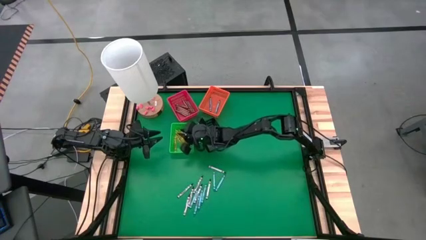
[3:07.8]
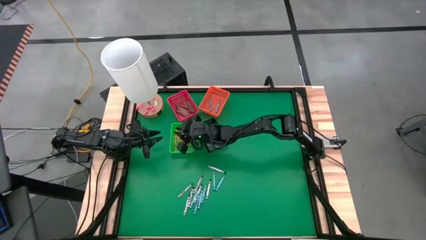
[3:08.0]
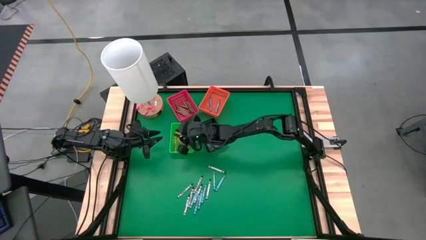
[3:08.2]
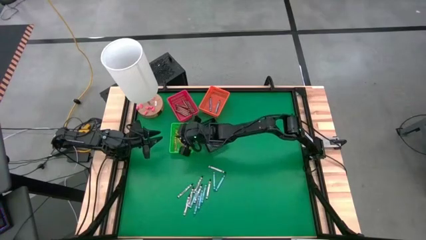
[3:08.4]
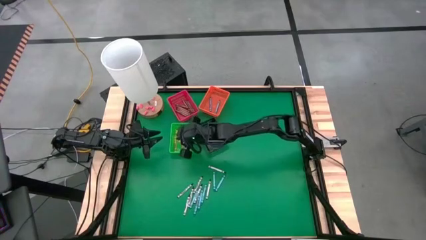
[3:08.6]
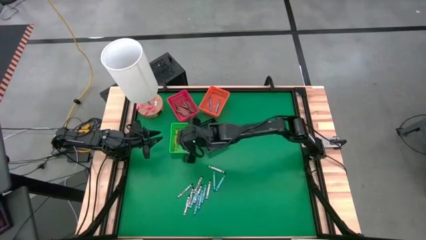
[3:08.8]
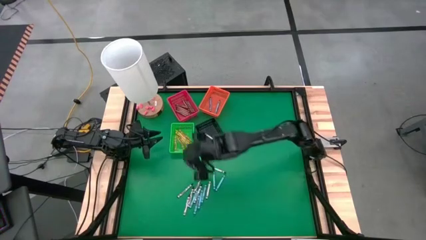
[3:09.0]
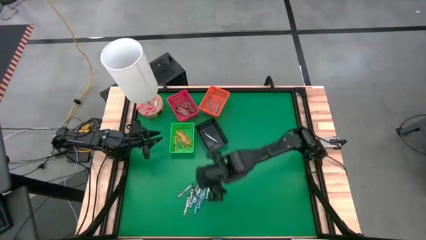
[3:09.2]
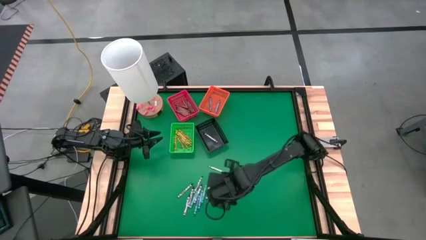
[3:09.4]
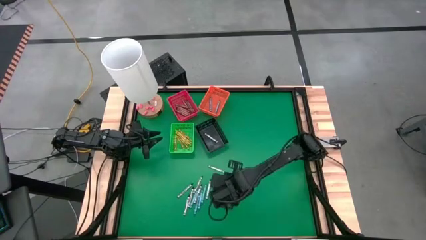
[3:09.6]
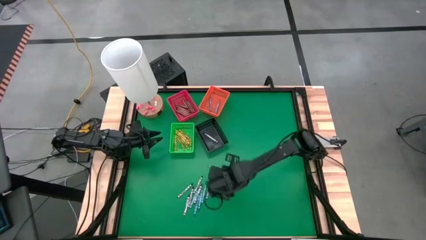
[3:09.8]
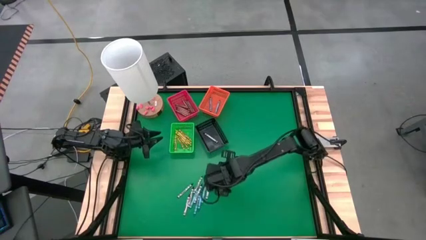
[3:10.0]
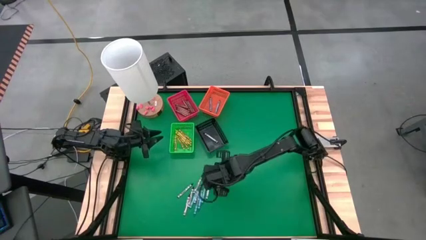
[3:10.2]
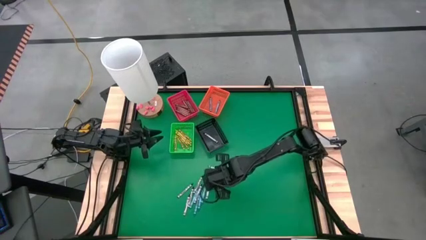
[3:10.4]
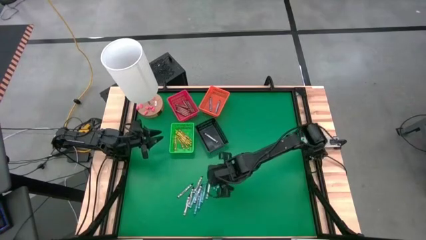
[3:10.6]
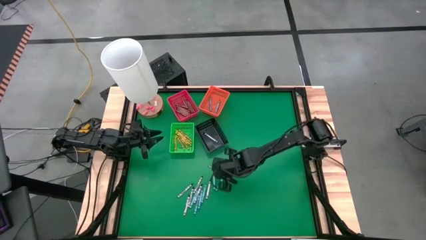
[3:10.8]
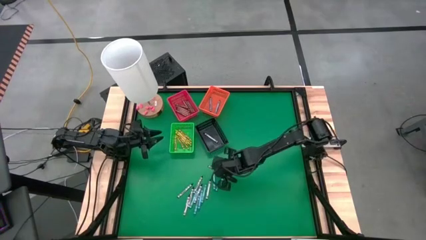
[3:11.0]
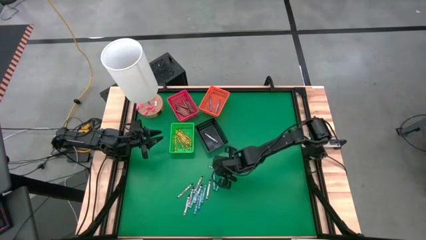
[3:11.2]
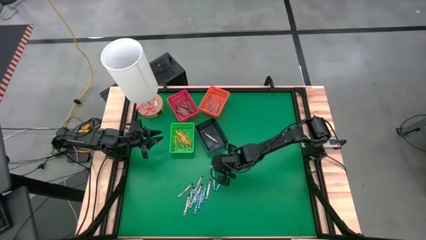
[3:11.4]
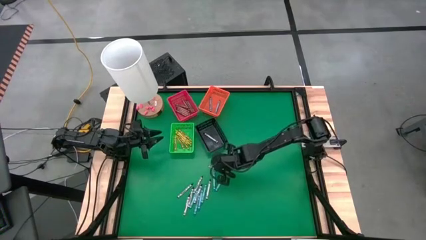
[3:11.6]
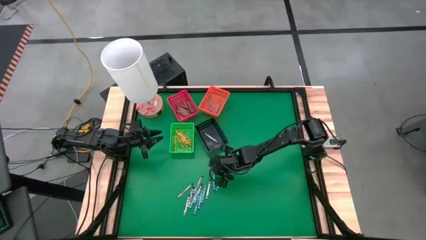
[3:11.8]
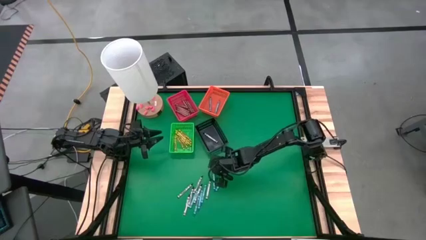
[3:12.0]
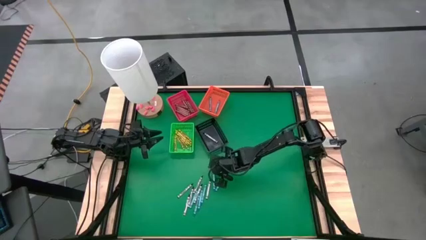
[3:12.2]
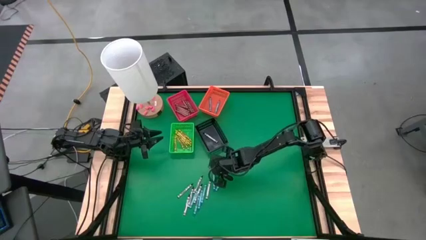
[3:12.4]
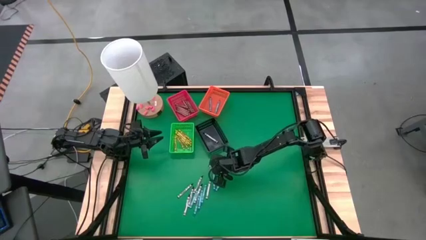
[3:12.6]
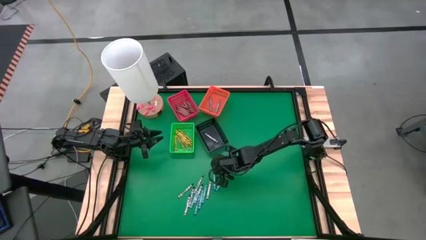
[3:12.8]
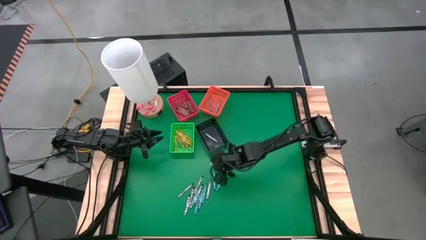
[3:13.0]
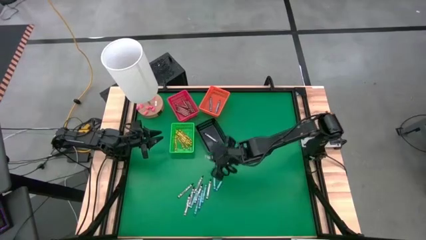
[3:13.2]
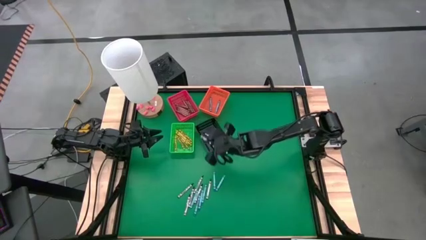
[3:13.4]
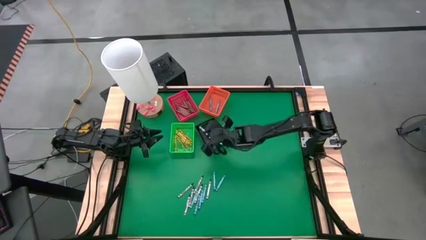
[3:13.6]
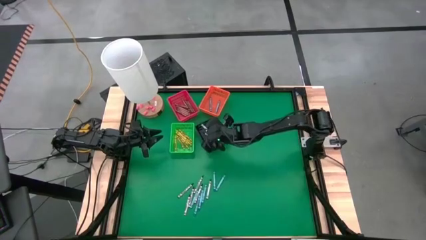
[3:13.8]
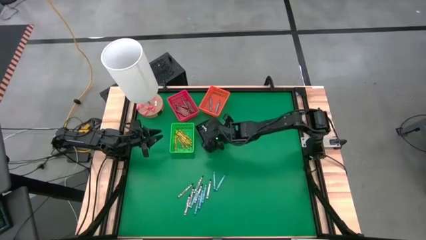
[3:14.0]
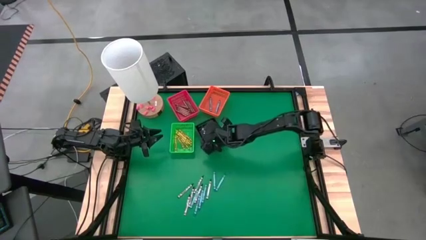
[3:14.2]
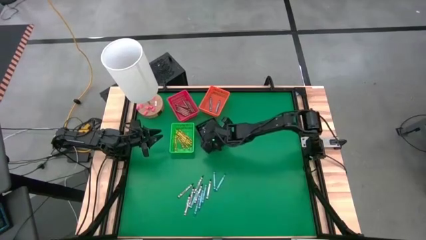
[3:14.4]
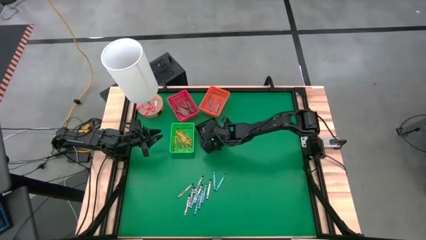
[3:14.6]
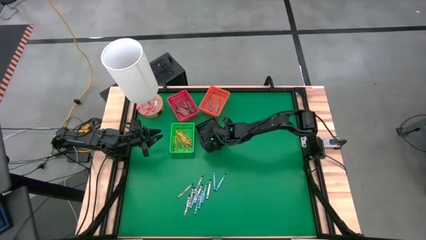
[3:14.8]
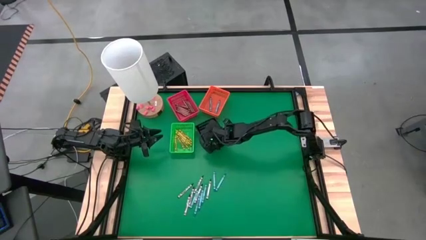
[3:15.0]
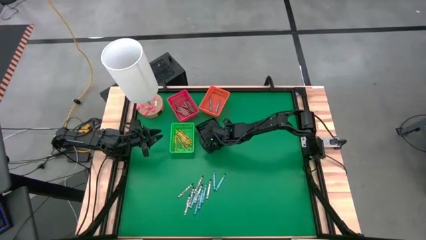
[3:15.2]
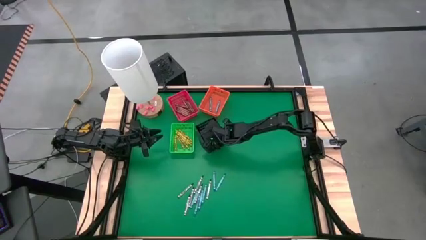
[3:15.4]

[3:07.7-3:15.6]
Task: Sort crayons
Put the black crayon into the black bin

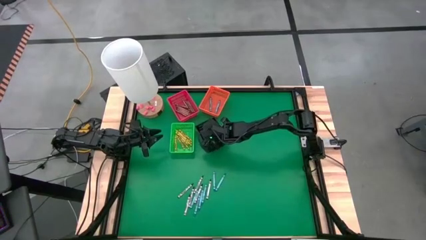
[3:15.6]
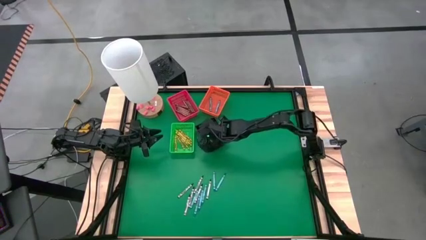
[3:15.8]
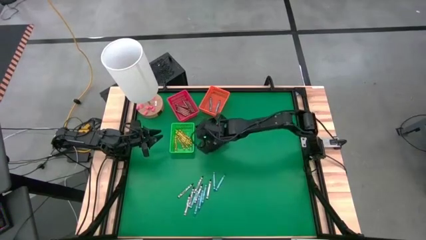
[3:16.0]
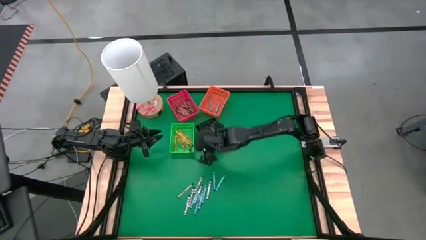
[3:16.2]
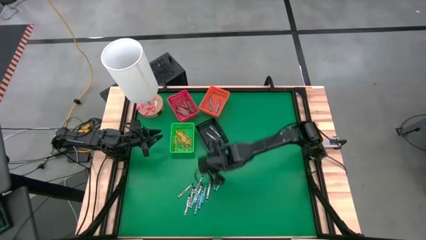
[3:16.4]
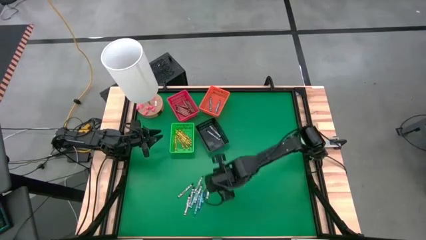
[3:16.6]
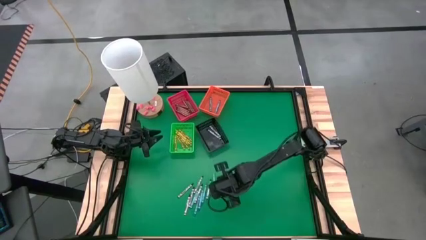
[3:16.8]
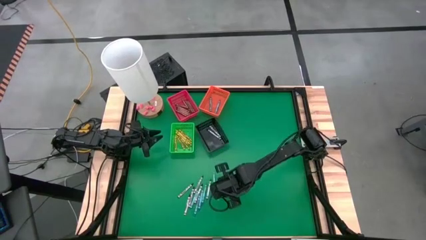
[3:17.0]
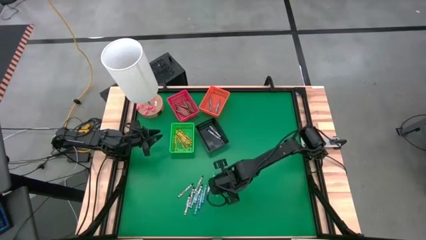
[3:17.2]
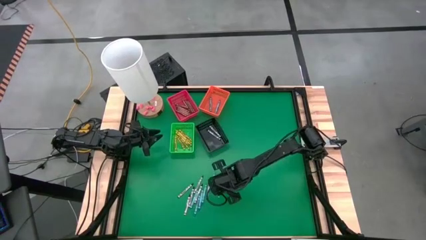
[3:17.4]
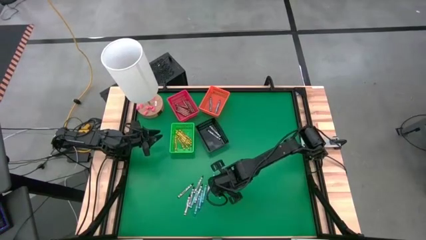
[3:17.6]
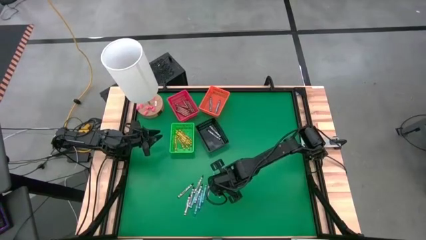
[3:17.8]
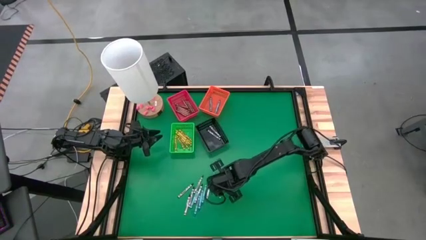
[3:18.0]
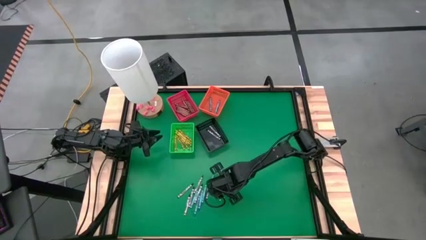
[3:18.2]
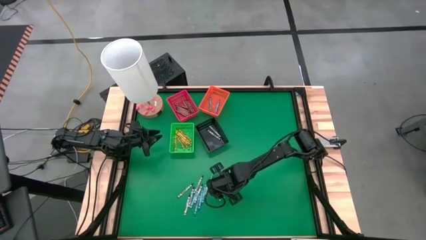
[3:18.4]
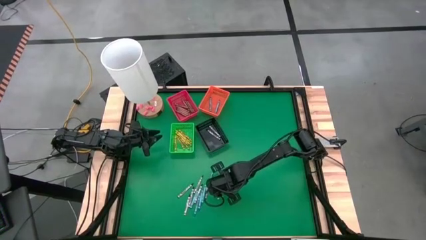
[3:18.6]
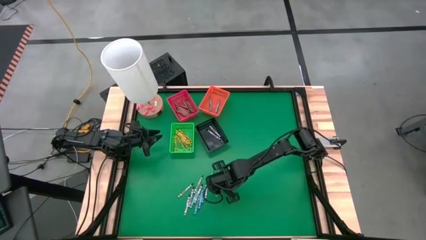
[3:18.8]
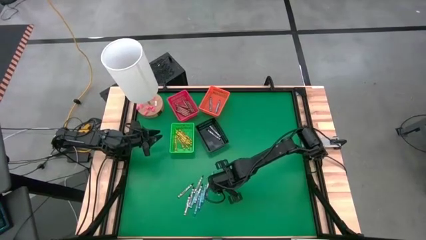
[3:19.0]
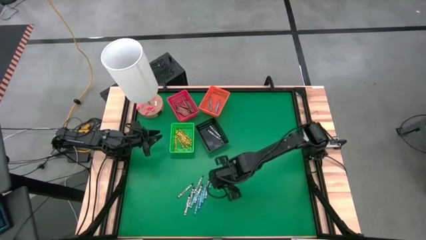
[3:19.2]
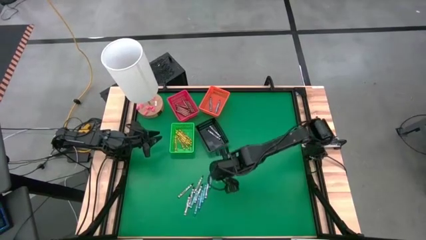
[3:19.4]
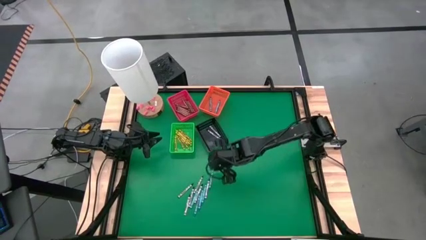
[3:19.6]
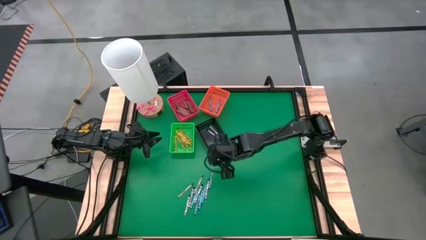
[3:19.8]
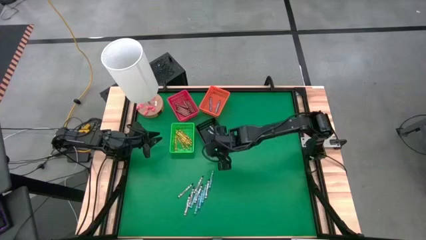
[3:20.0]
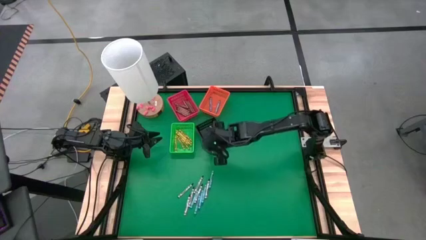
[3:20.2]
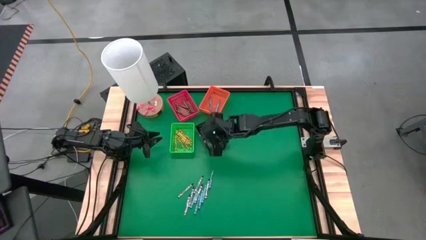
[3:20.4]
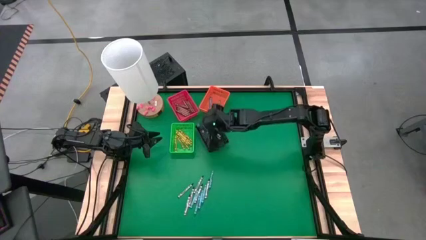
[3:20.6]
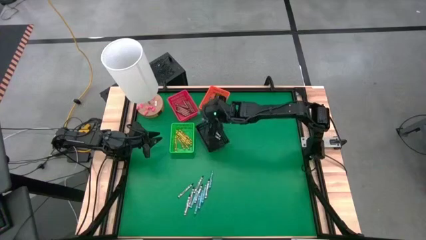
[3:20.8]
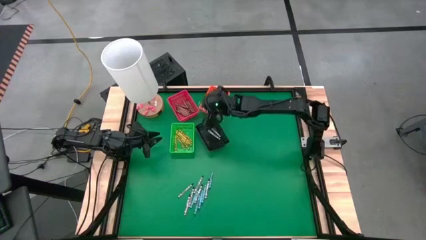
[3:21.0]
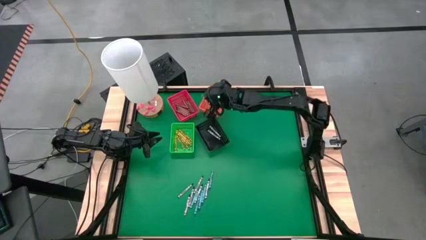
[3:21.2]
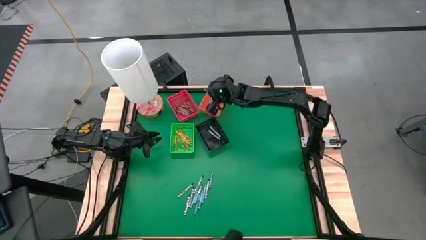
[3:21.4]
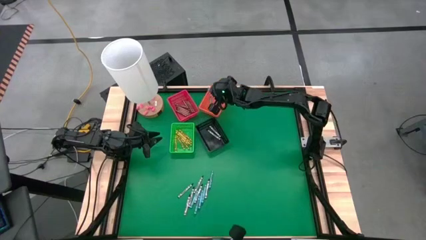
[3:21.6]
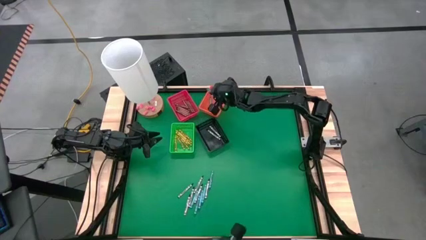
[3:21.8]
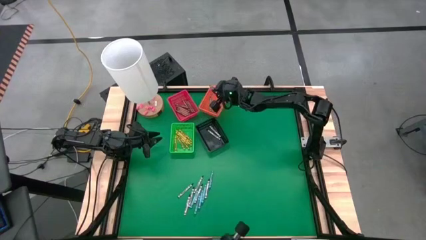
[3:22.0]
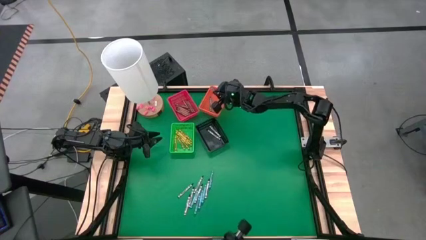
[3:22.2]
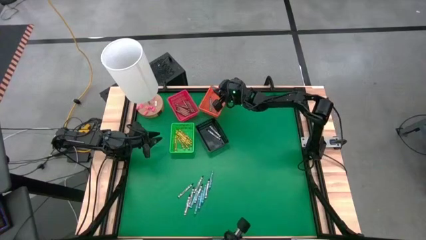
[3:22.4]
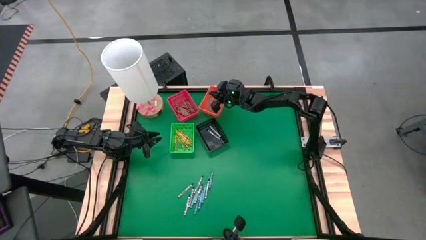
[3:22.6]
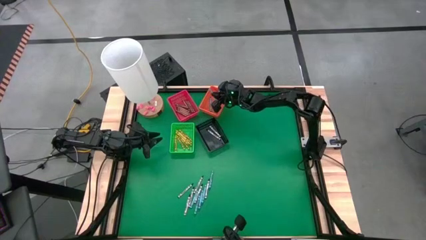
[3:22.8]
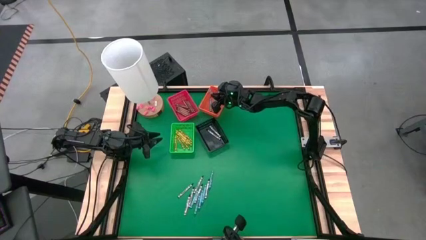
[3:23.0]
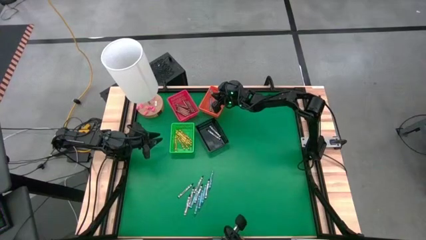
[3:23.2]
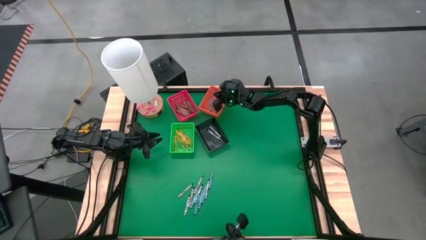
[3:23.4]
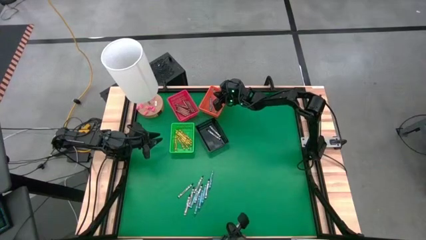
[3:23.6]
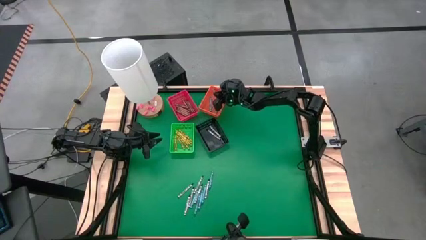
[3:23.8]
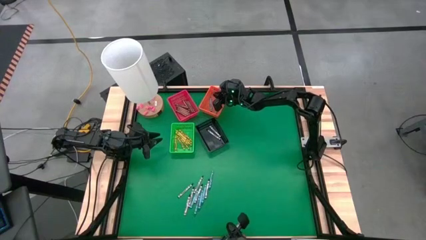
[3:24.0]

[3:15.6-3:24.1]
Put the blue crayon into the orange bin
